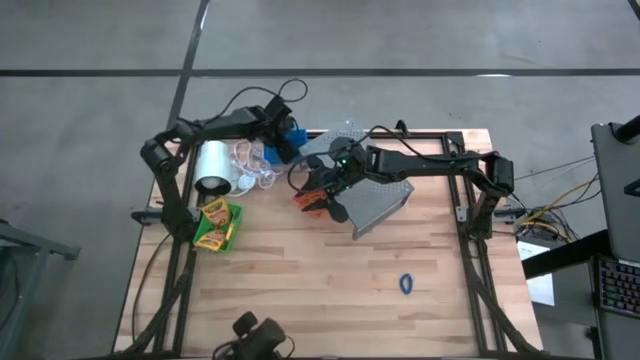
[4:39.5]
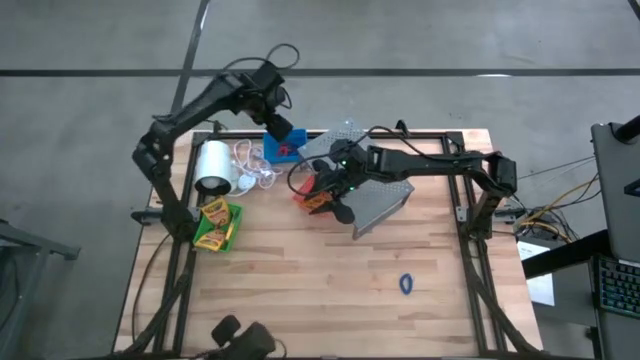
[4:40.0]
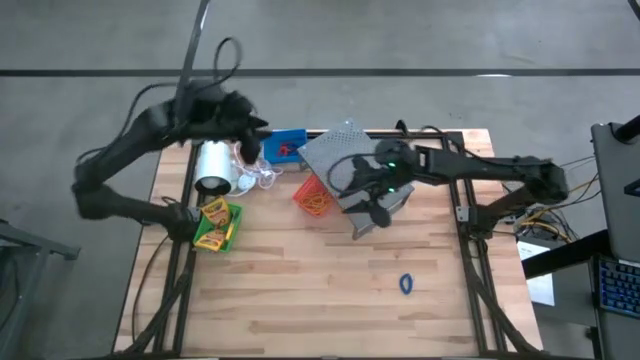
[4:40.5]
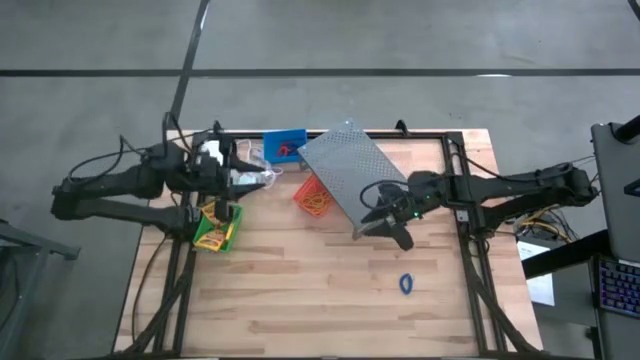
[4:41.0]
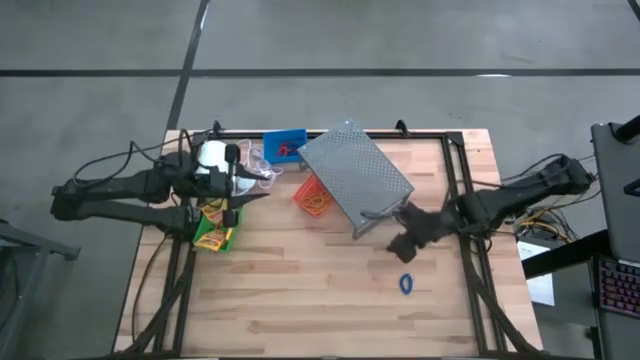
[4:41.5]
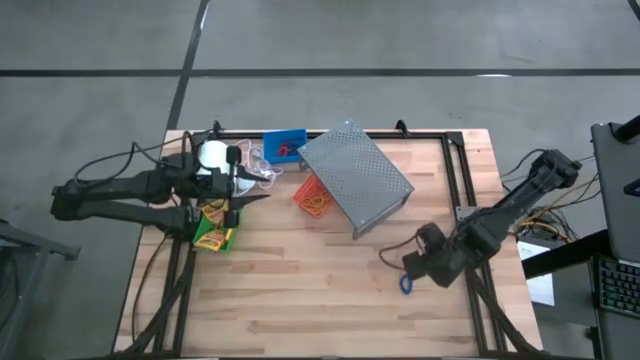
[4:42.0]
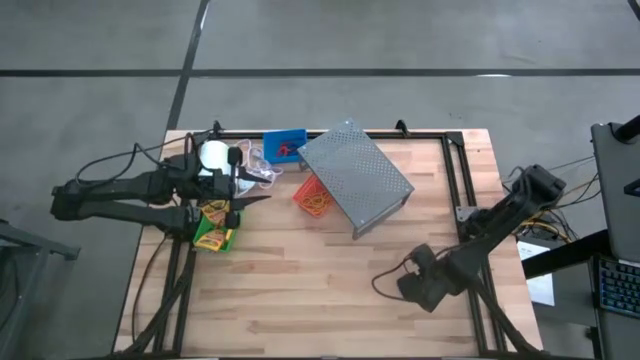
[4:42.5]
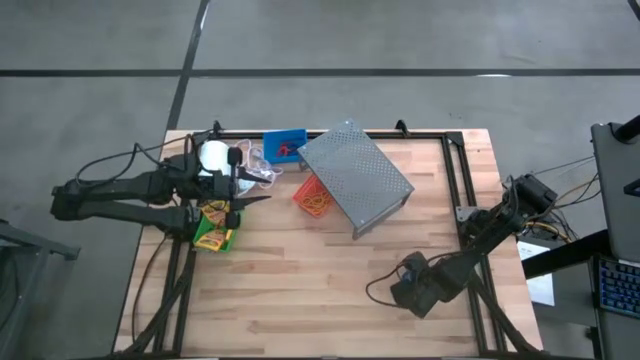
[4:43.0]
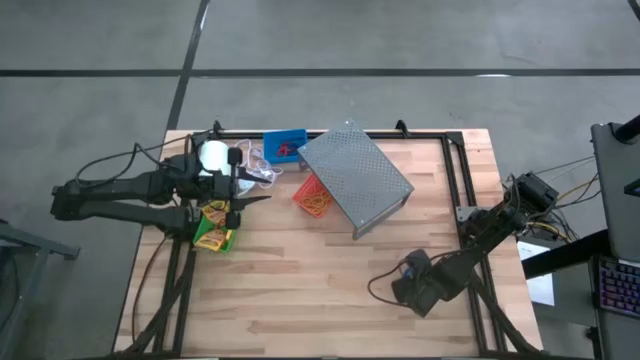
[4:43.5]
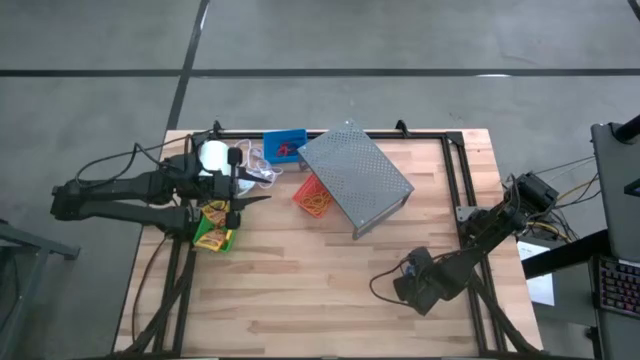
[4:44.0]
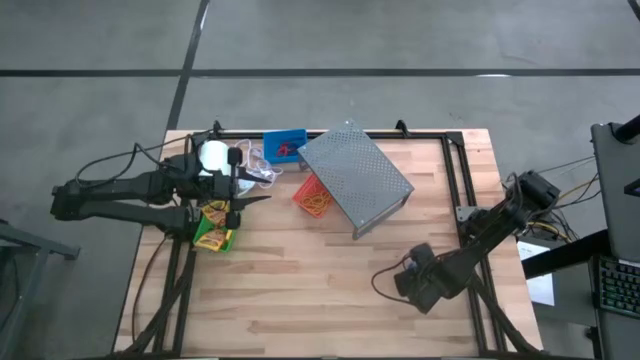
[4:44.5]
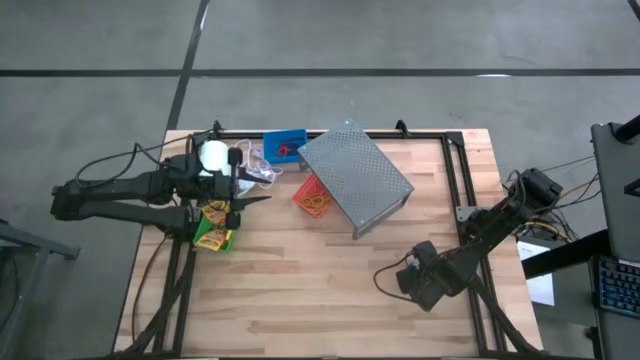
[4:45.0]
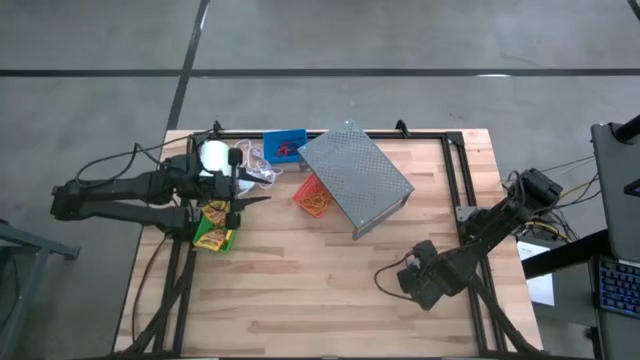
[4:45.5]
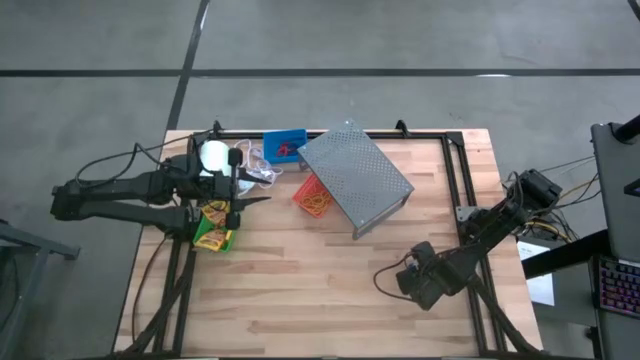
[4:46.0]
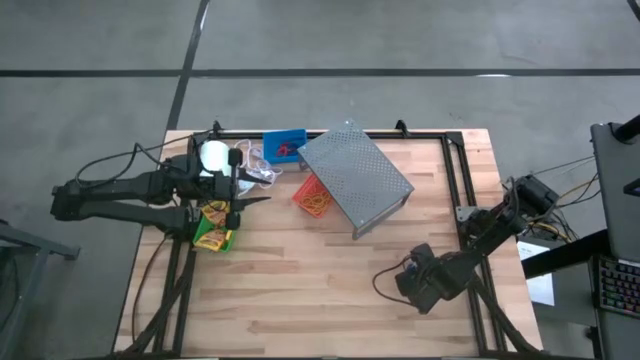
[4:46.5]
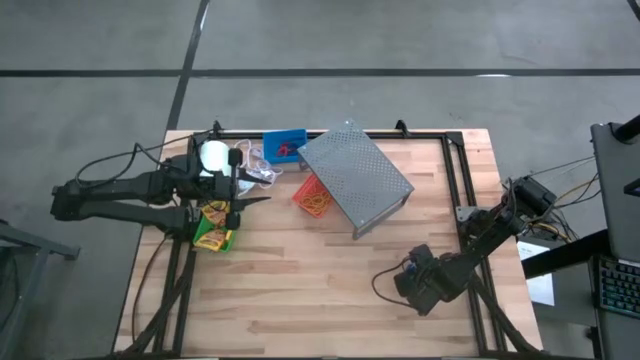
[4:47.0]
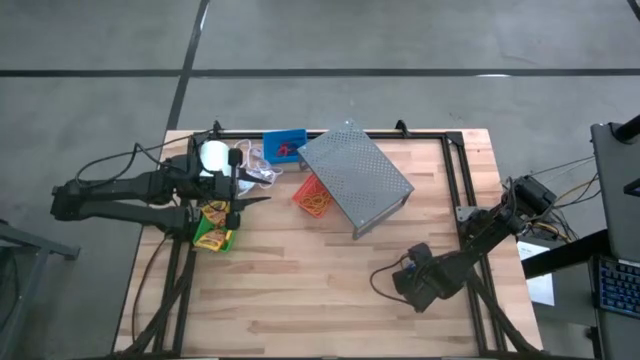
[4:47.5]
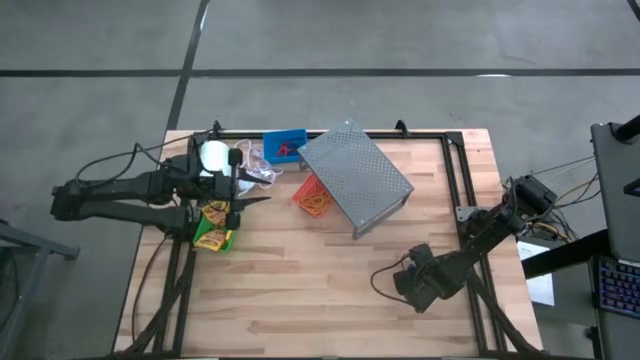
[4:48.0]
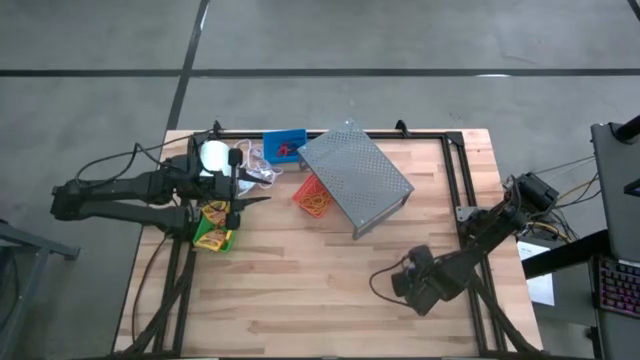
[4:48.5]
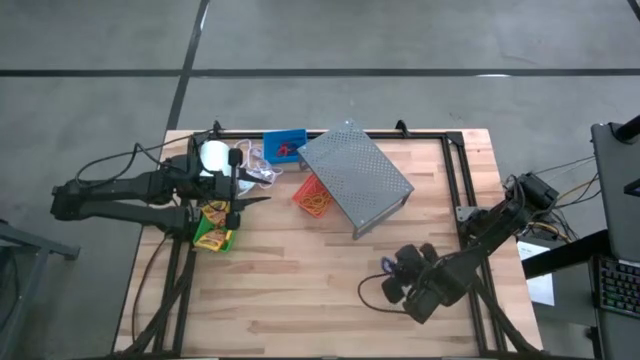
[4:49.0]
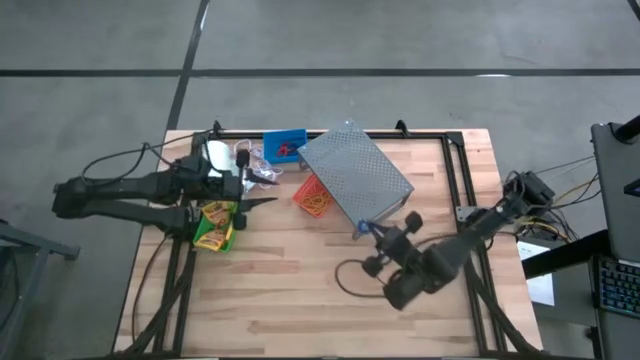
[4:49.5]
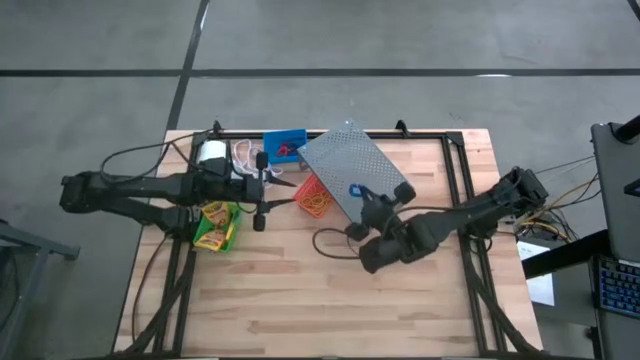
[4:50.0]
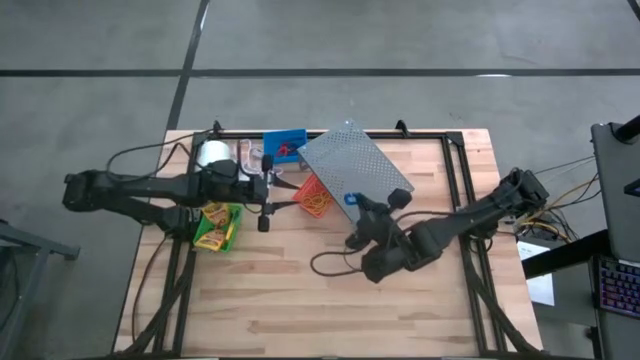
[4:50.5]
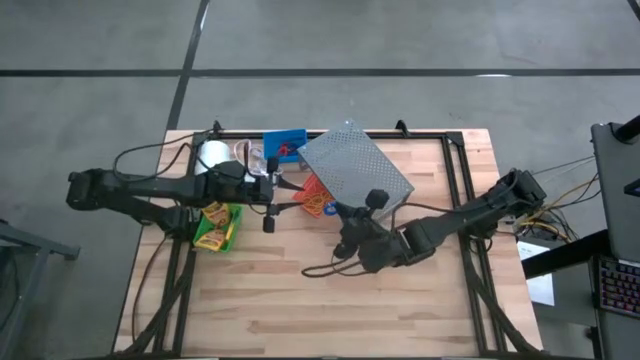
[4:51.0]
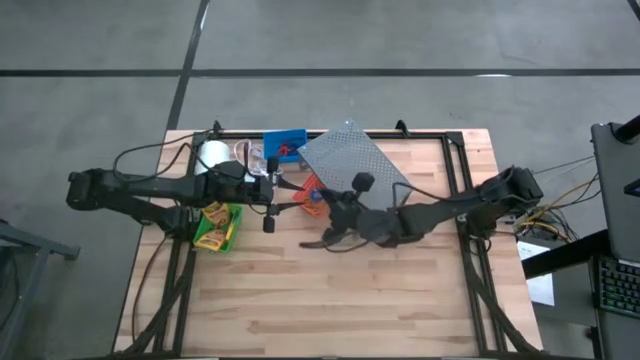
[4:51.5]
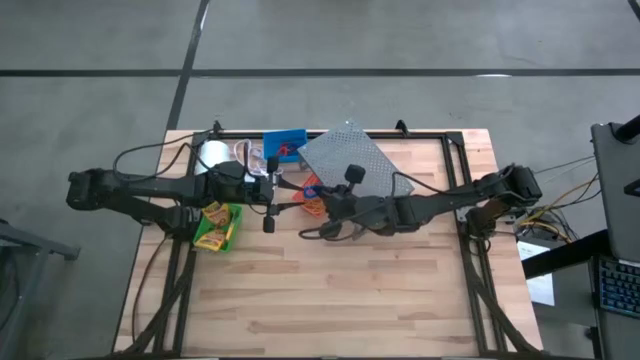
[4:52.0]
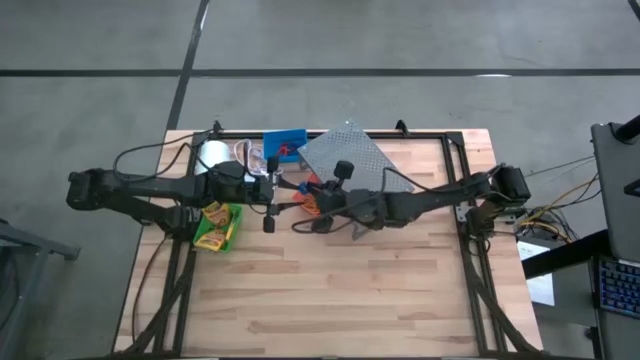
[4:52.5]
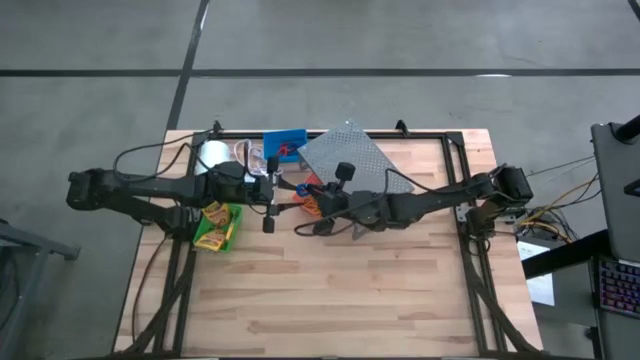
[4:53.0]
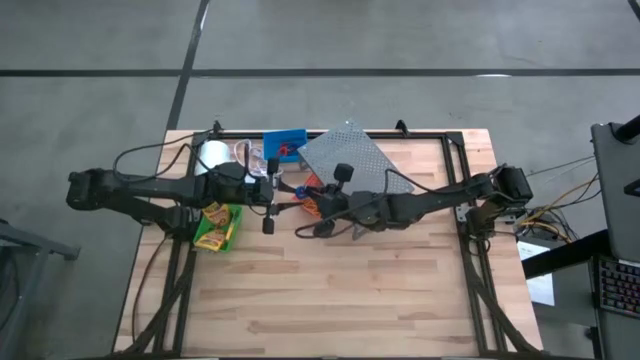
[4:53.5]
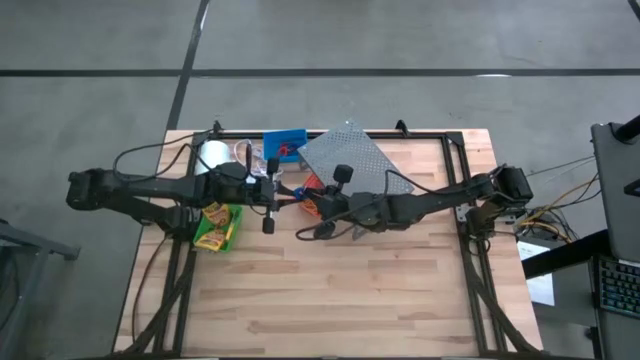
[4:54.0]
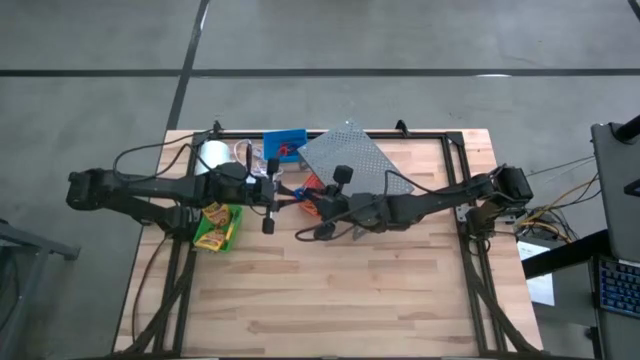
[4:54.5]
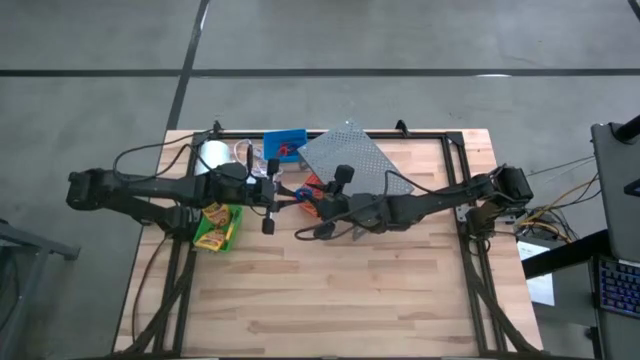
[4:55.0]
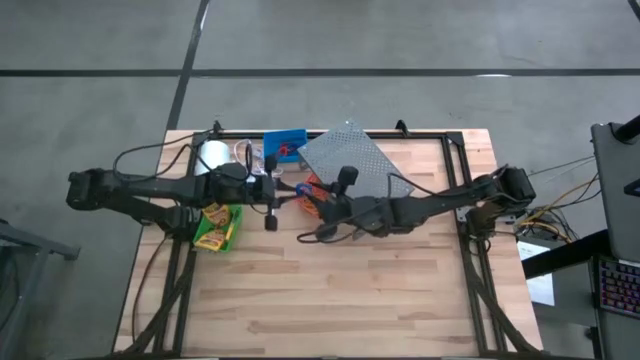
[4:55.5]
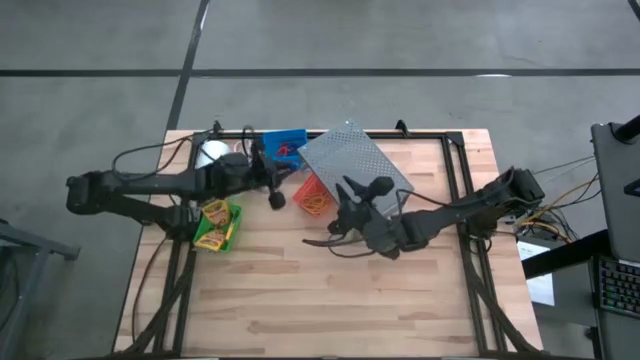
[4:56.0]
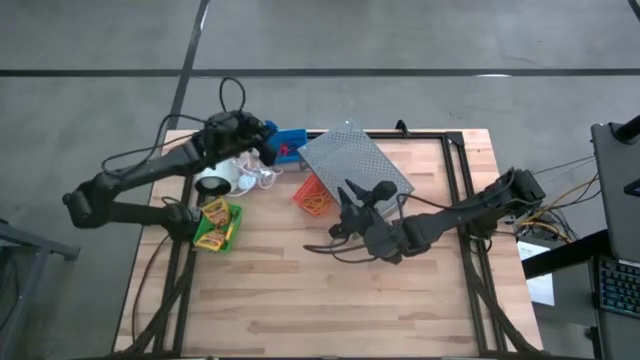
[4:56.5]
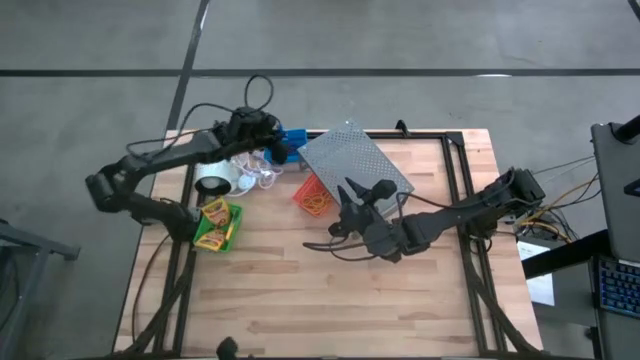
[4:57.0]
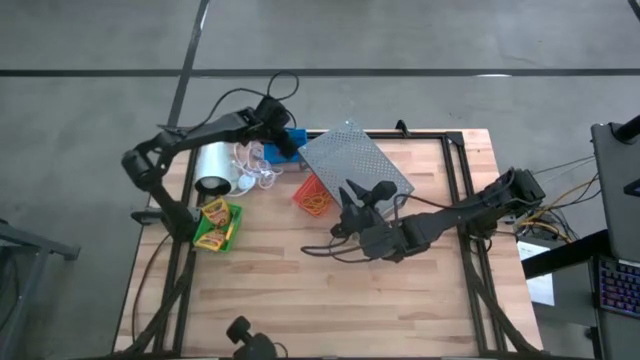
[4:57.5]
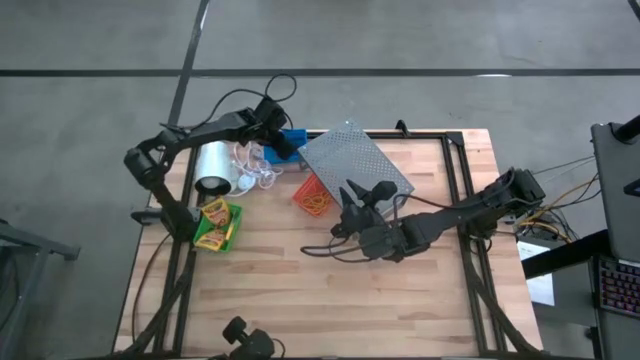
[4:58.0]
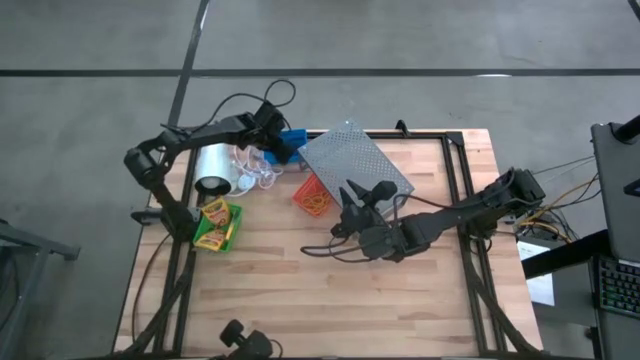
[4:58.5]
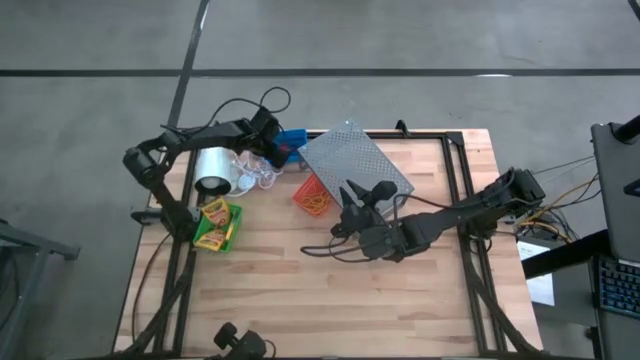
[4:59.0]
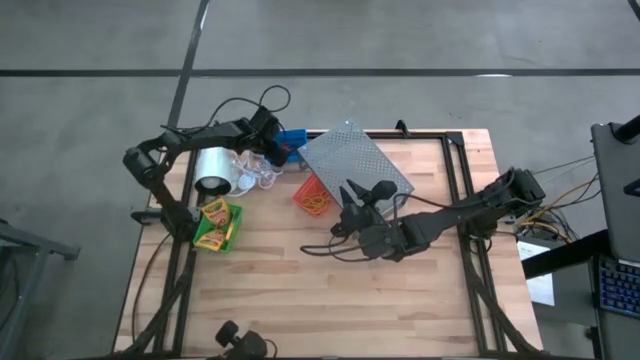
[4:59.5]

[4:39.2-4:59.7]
Task: Pick & Place Office Desk Supplies
Put the blue spring rubber band into the blue bin
